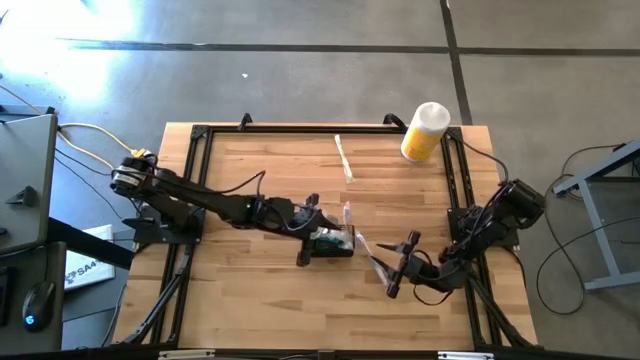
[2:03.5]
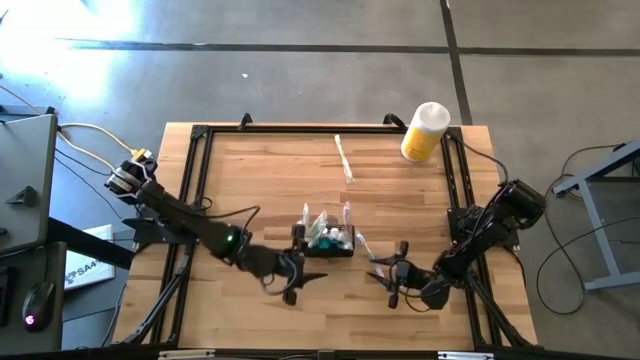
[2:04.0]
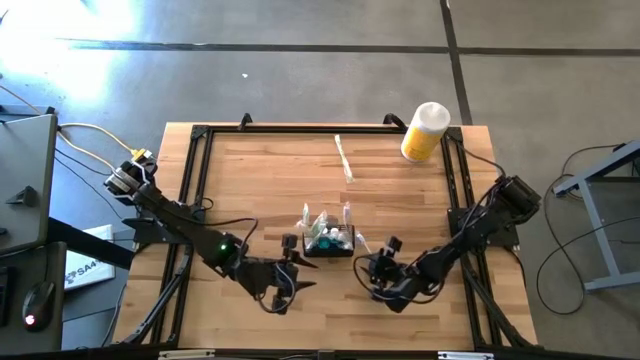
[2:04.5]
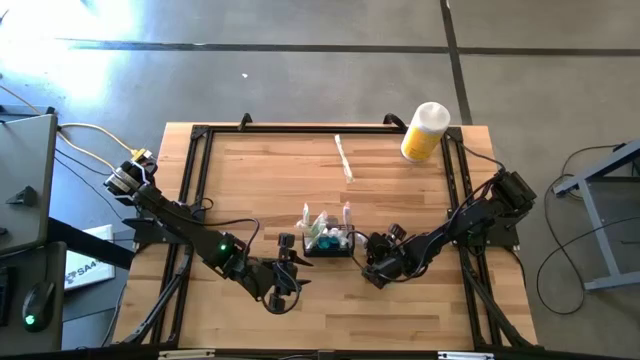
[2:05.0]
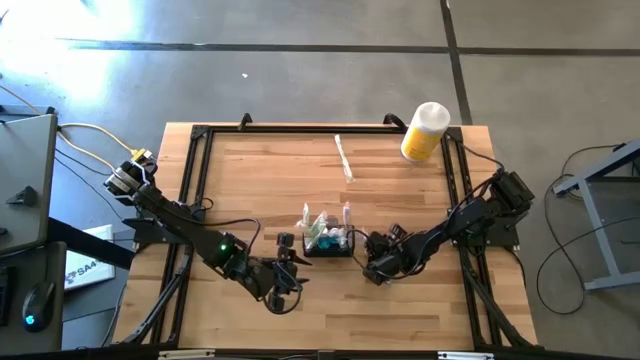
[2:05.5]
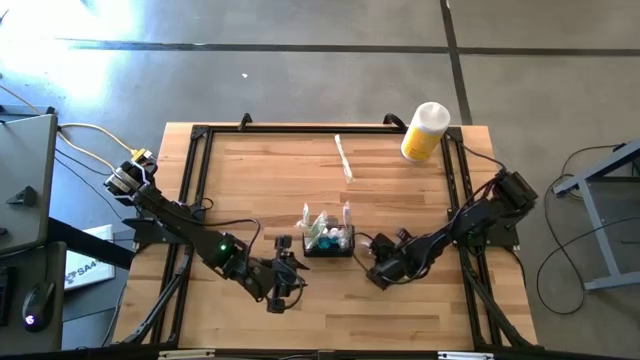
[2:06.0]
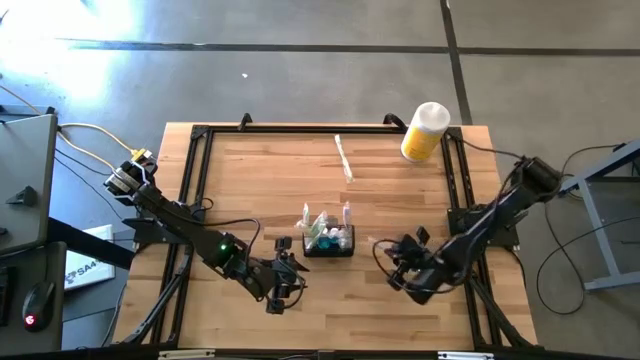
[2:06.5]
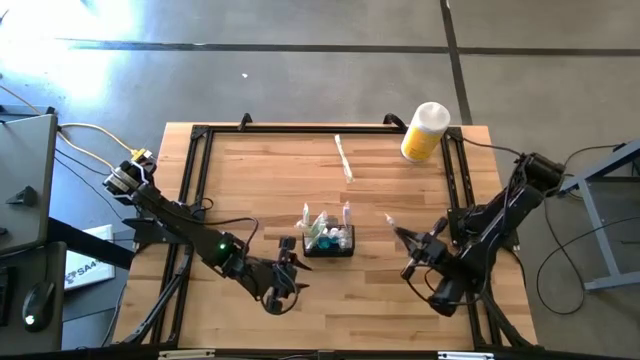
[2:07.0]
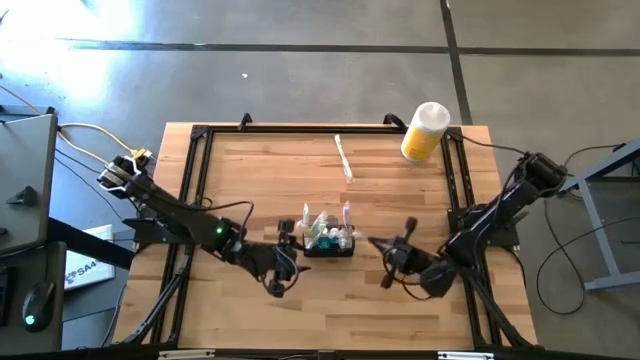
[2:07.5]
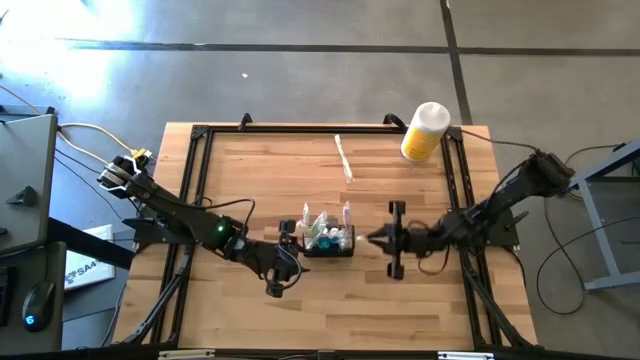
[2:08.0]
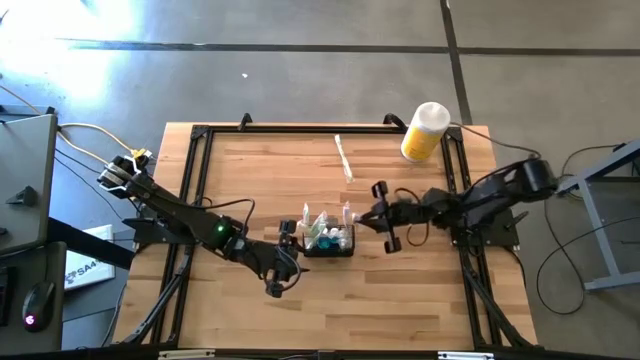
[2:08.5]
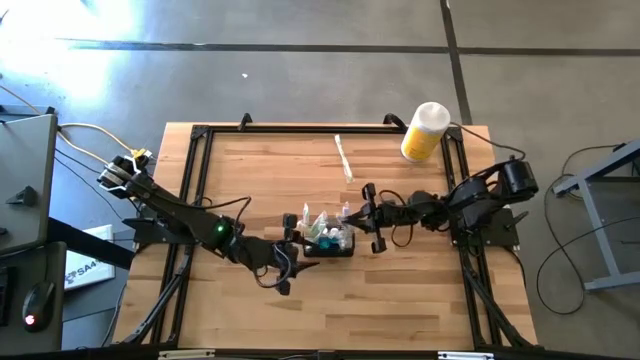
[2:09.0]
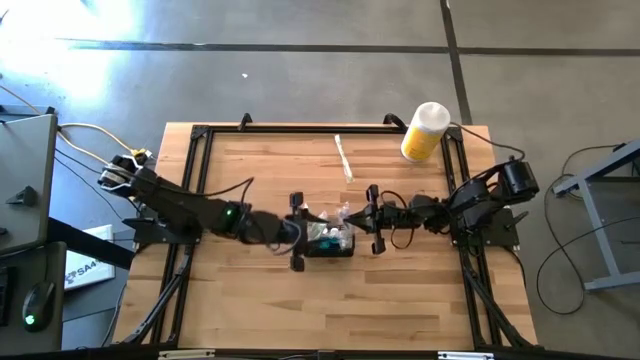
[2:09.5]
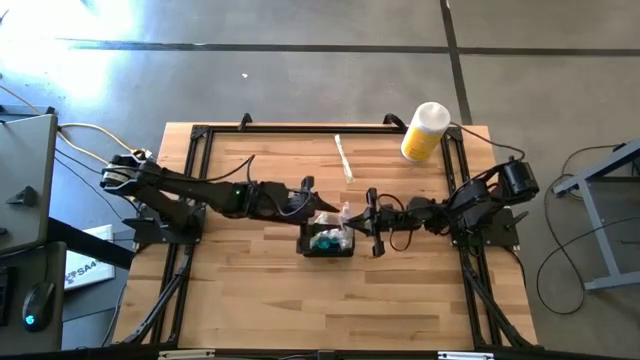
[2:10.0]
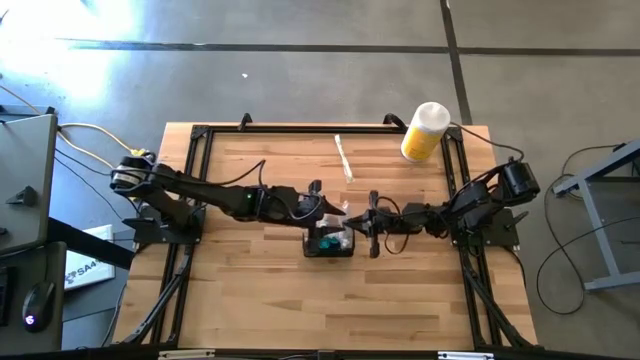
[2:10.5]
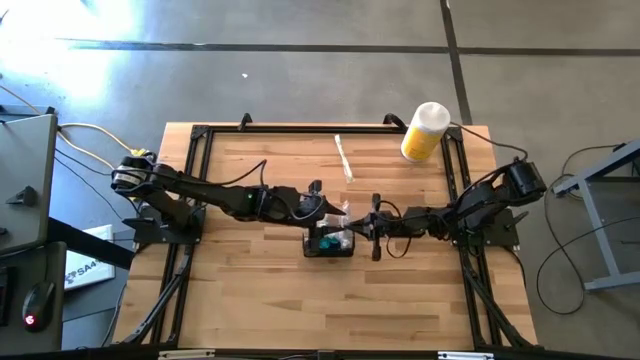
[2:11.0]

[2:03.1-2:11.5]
Task: Pick & Place toothbrushing station
Put the blue toothbrush into the wire organizer

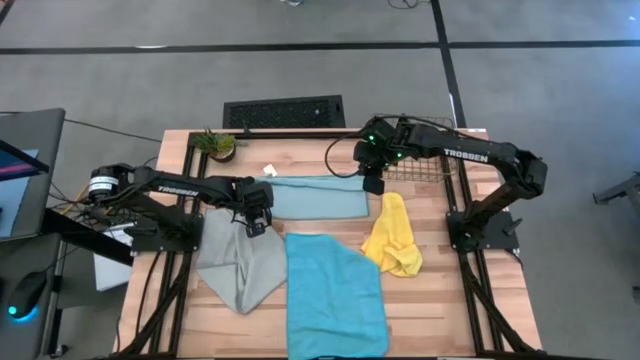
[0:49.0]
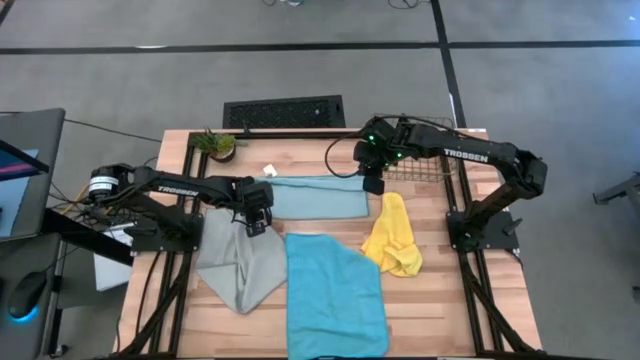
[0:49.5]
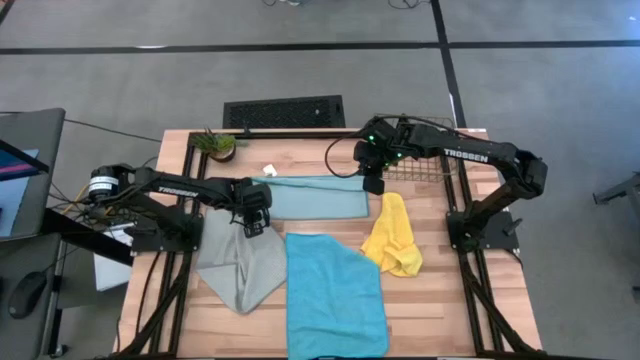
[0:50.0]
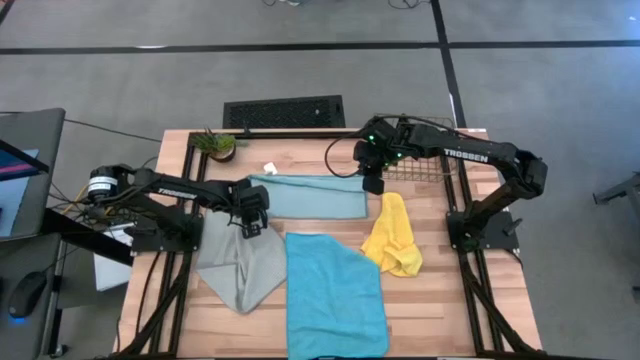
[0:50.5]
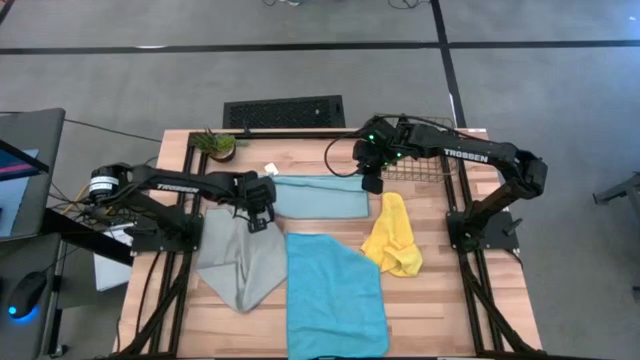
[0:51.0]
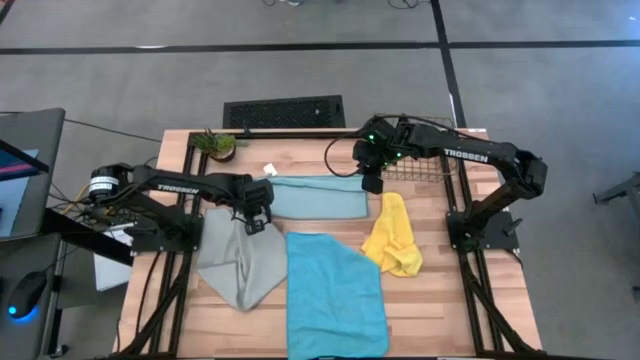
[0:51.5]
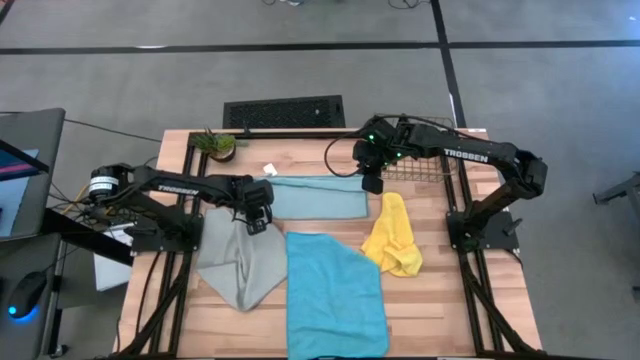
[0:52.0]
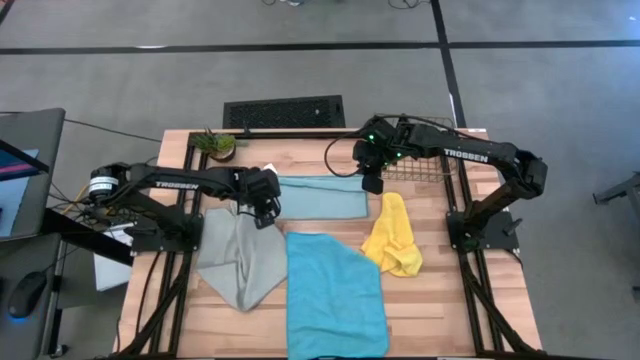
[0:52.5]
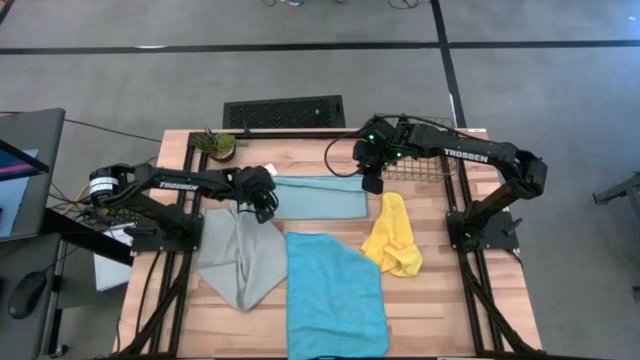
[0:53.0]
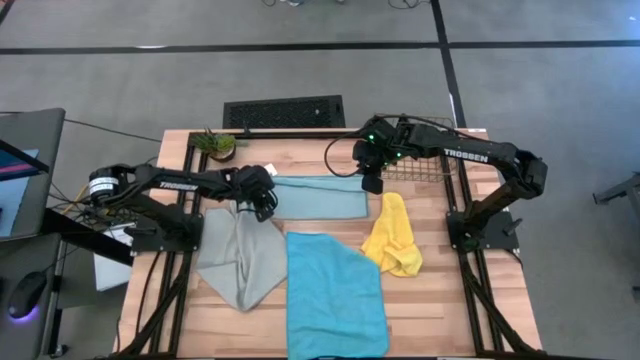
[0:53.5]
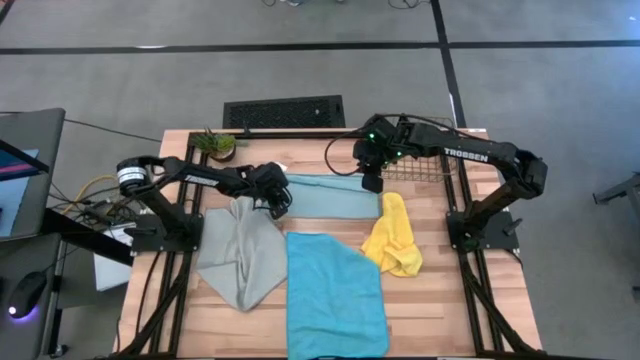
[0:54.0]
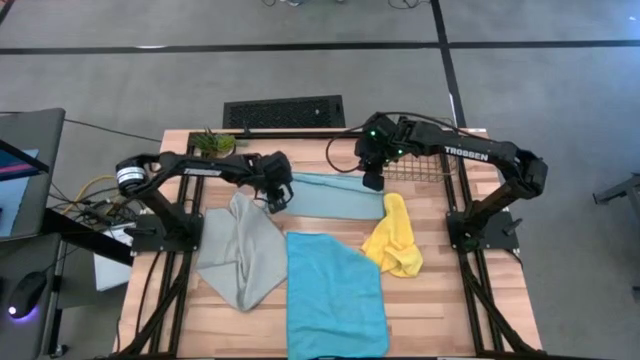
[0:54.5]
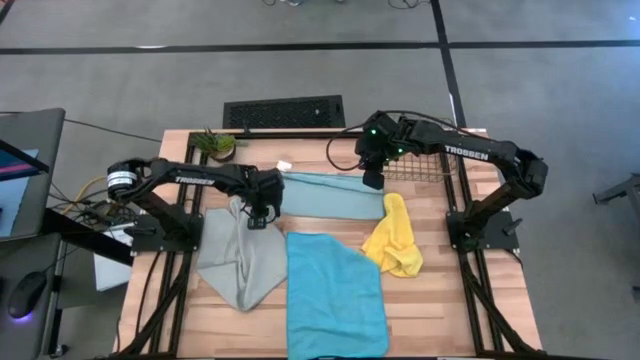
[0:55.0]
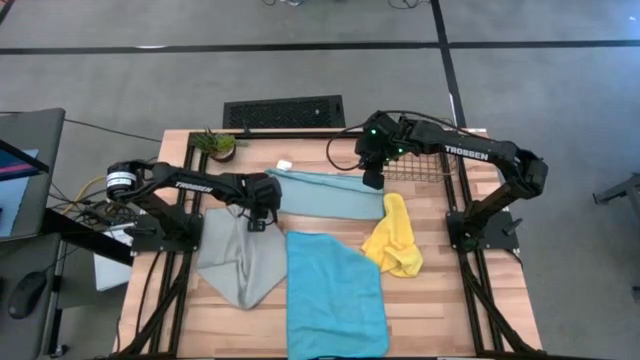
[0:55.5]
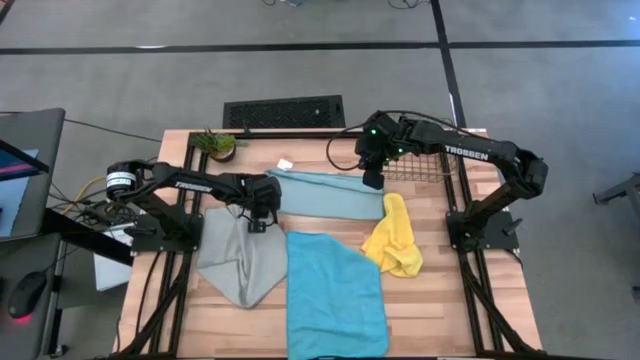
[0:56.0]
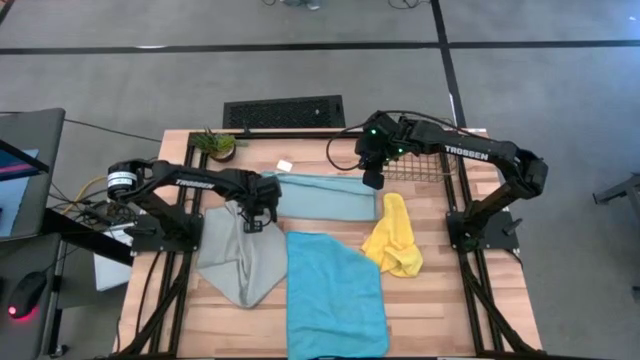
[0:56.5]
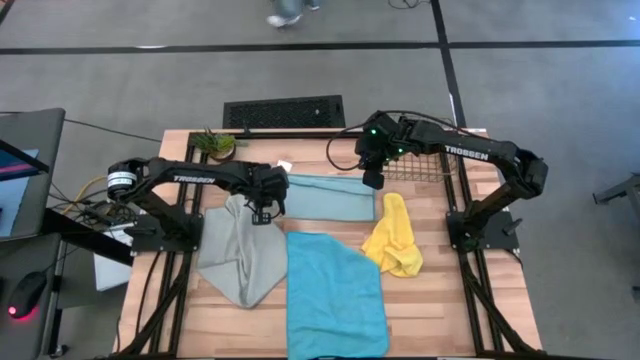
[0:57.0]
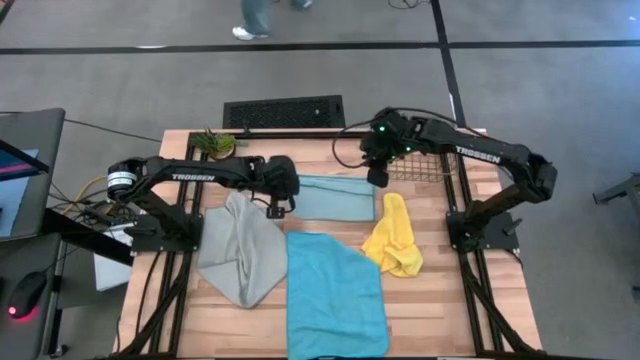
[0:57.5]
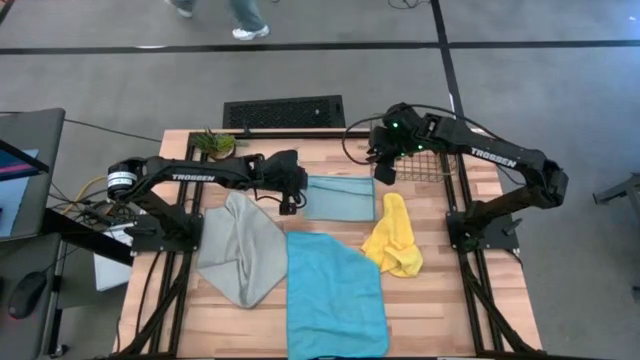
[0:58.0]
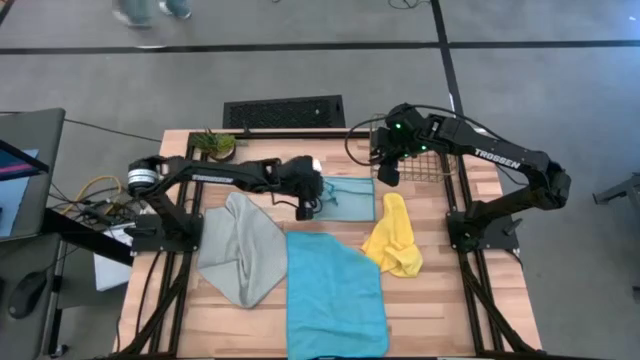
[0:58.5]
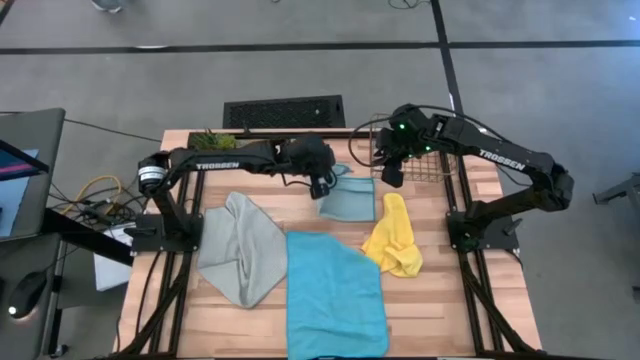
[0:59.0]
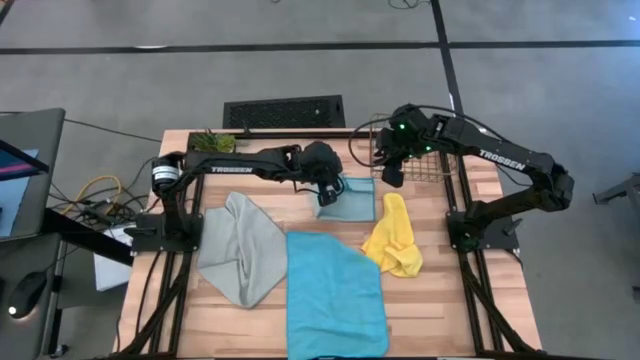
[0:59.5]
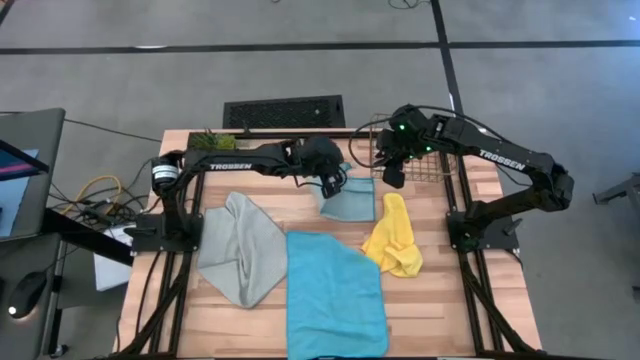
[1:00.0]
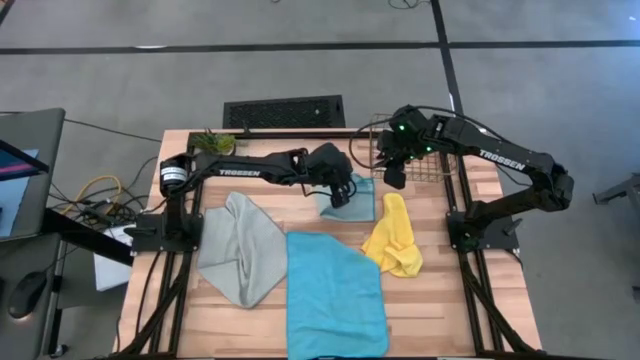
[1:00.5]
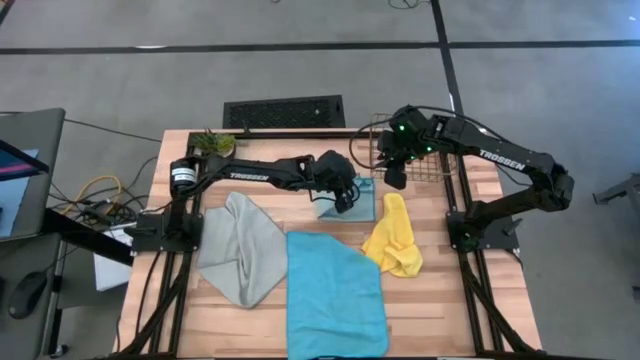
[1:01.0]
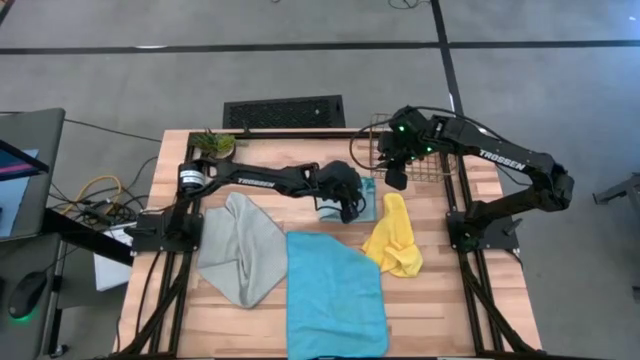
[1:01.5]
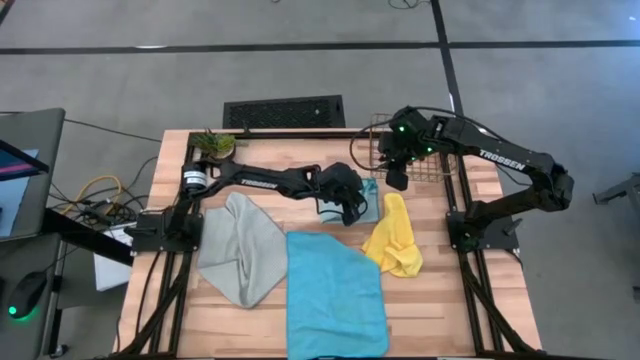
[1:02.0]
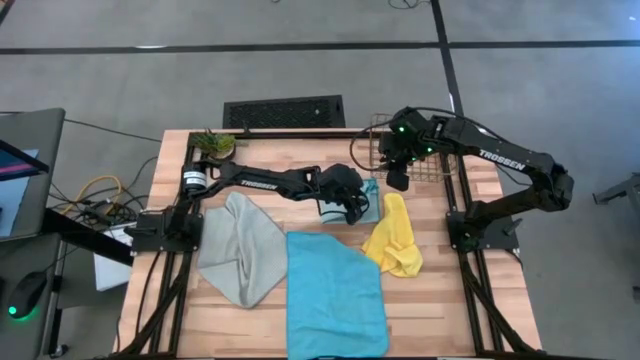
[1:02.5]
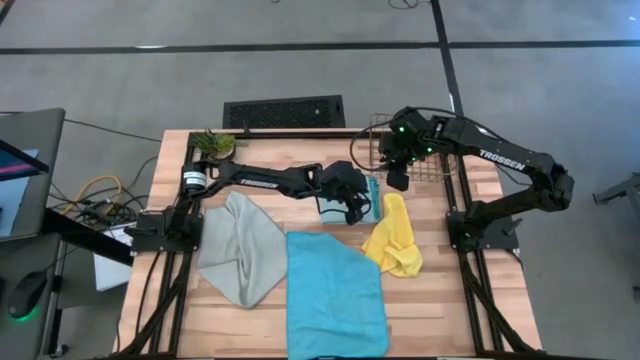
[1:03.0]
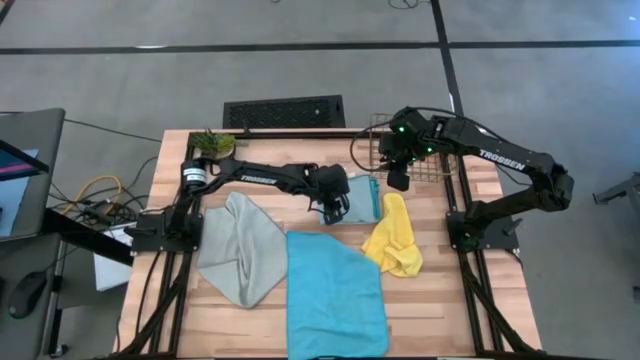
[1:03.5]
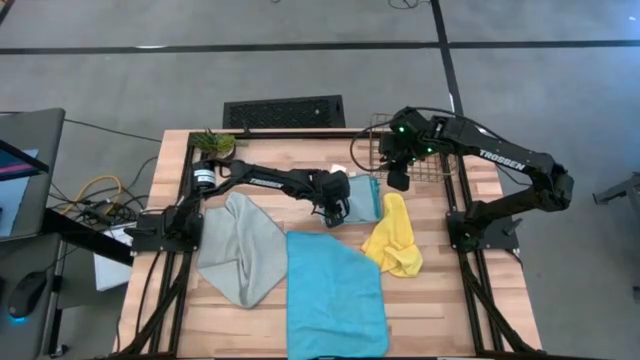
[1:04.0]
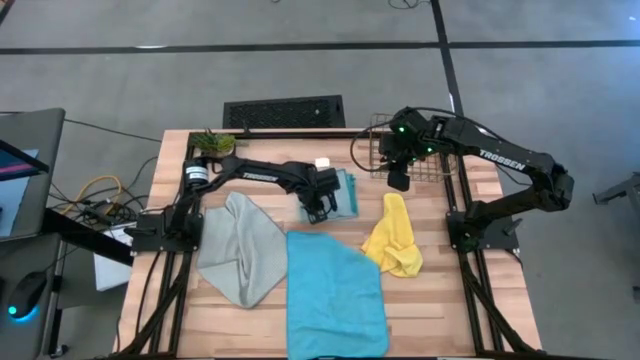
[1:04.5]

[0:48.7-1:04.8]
Task: Fold microfiber towels
Fold the light blue microfiber cloth
